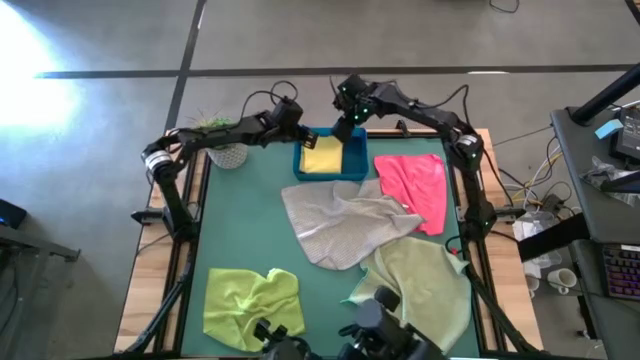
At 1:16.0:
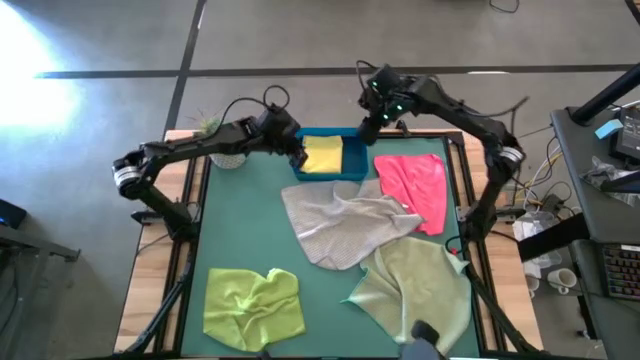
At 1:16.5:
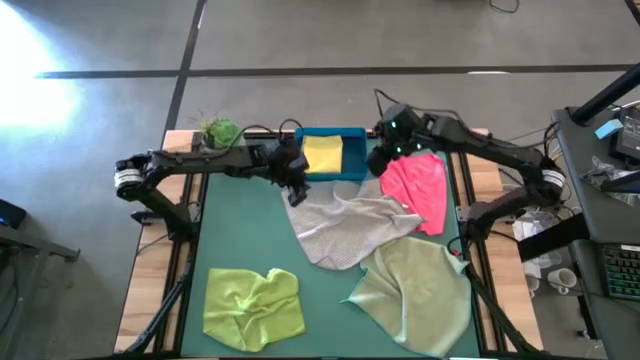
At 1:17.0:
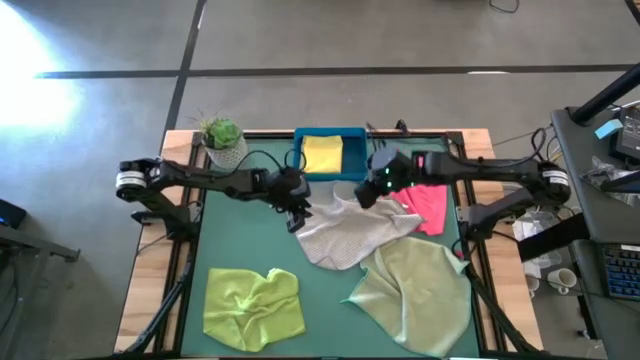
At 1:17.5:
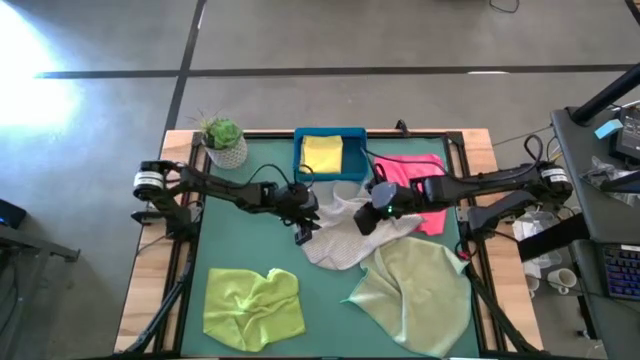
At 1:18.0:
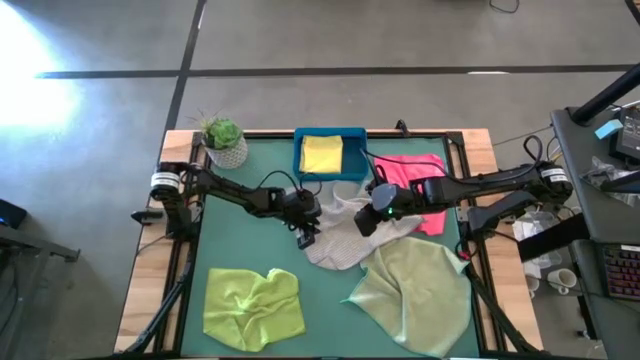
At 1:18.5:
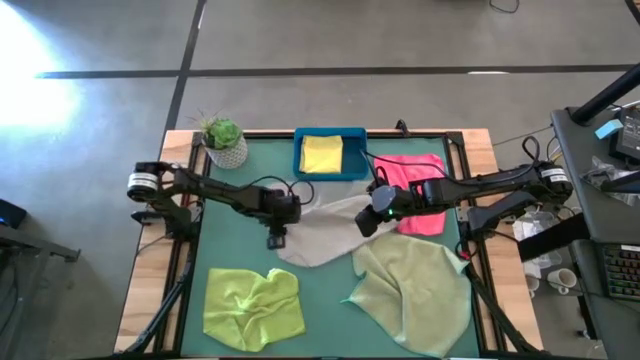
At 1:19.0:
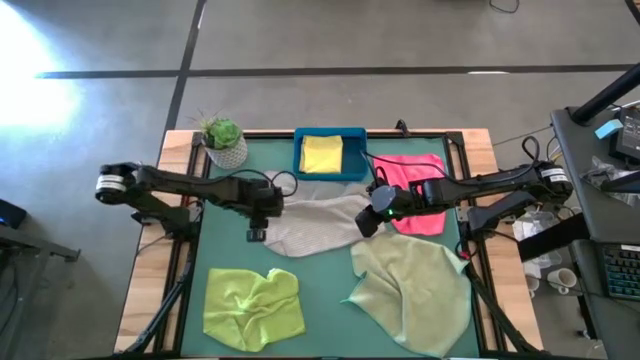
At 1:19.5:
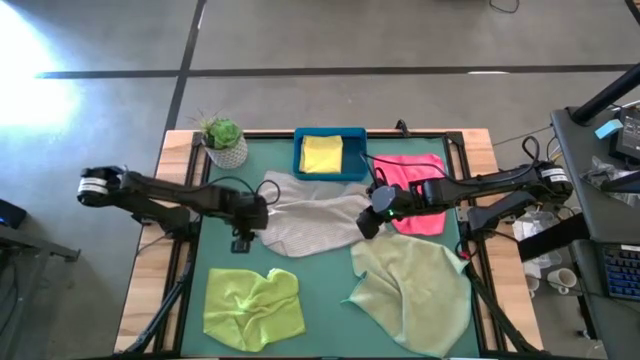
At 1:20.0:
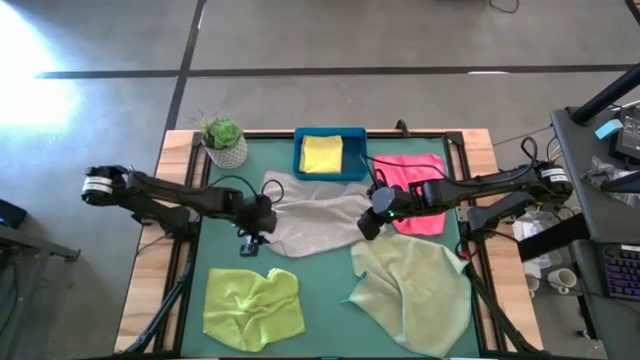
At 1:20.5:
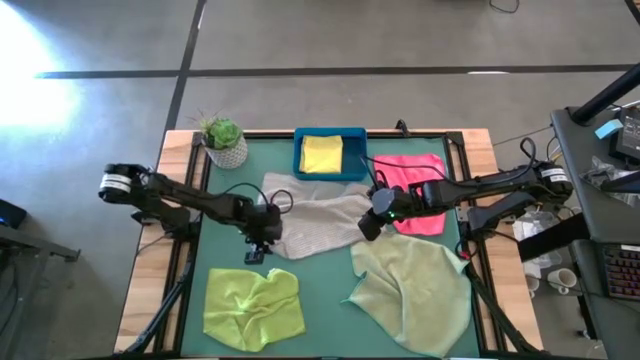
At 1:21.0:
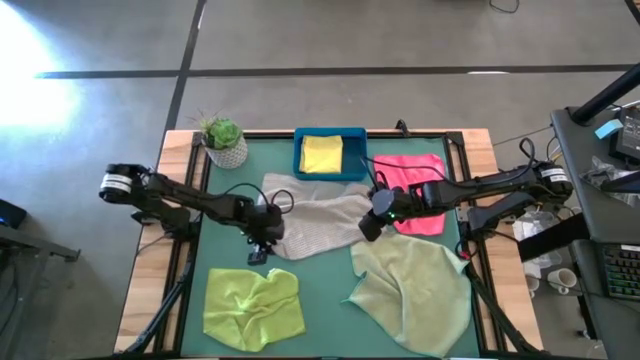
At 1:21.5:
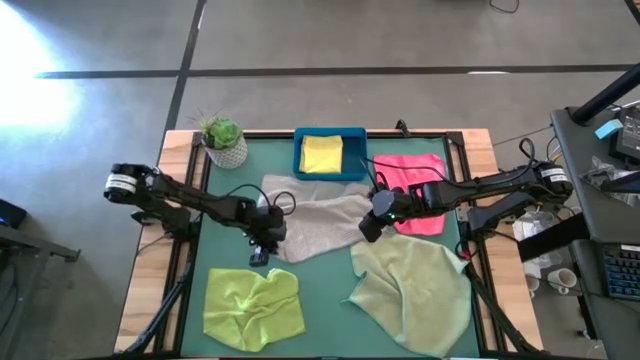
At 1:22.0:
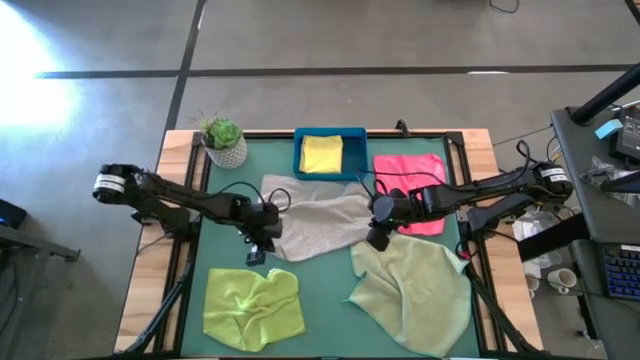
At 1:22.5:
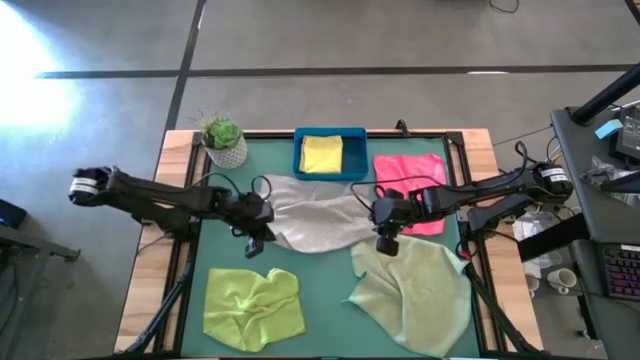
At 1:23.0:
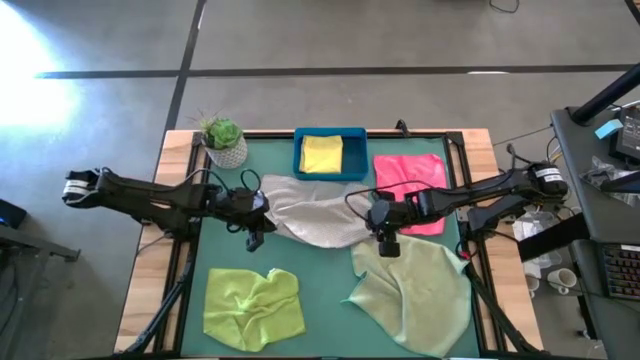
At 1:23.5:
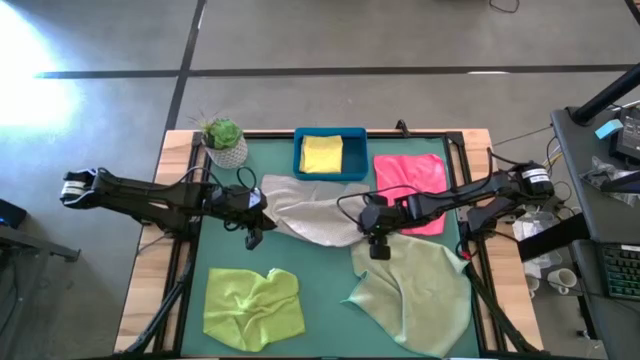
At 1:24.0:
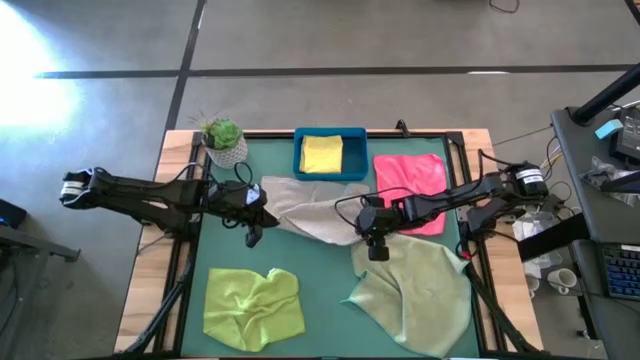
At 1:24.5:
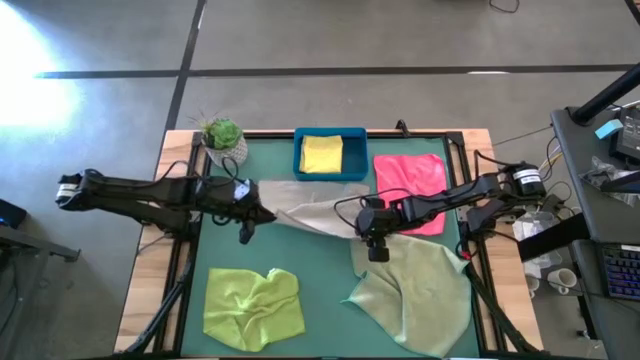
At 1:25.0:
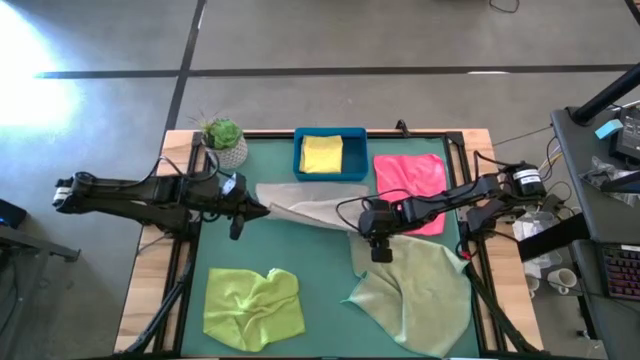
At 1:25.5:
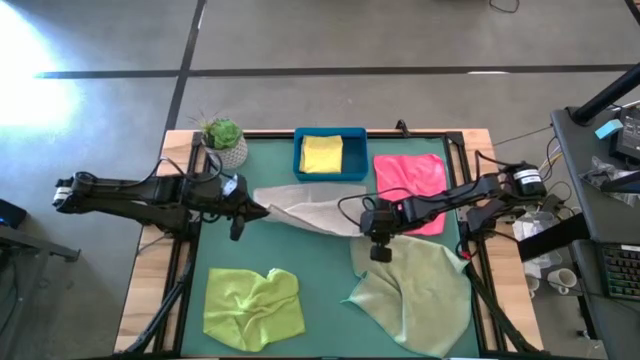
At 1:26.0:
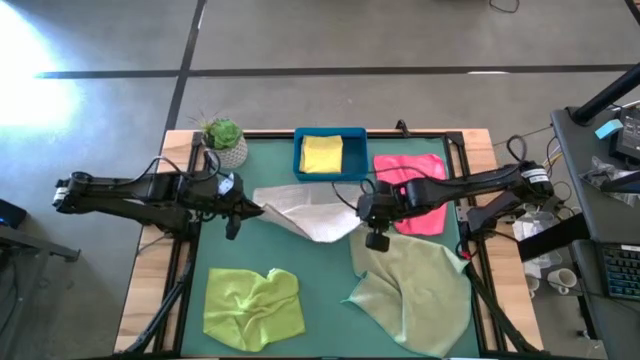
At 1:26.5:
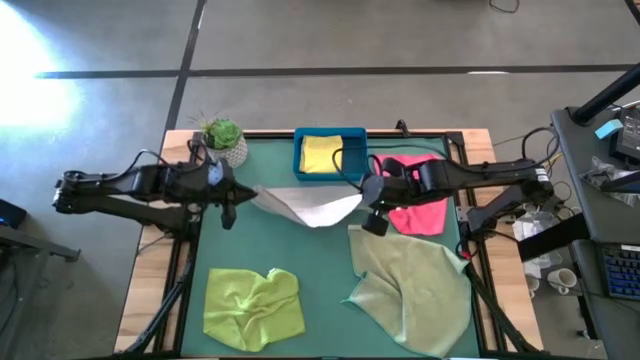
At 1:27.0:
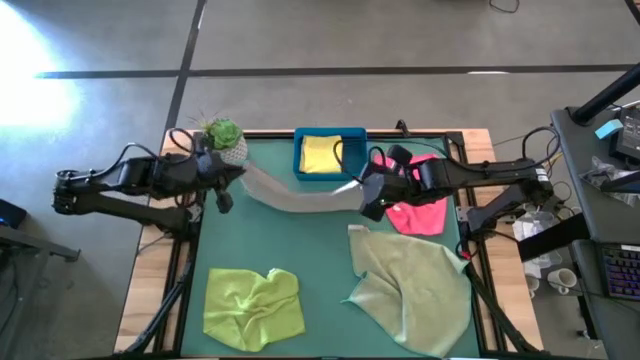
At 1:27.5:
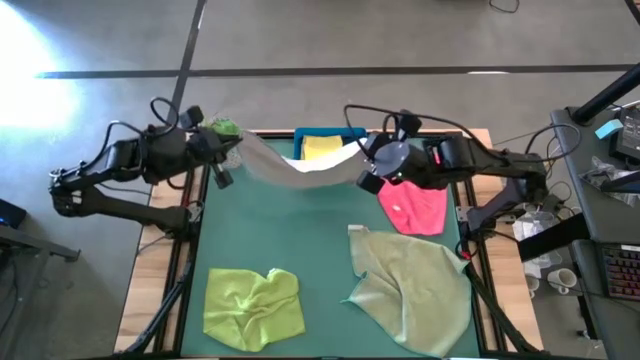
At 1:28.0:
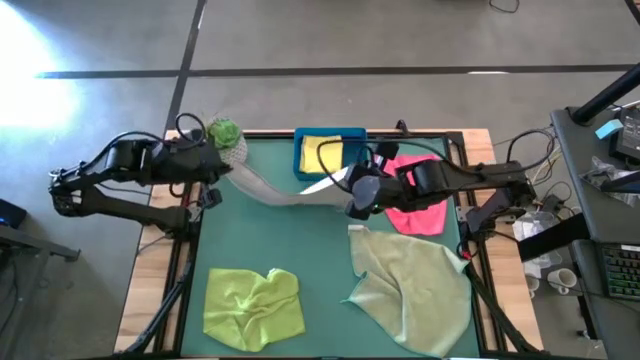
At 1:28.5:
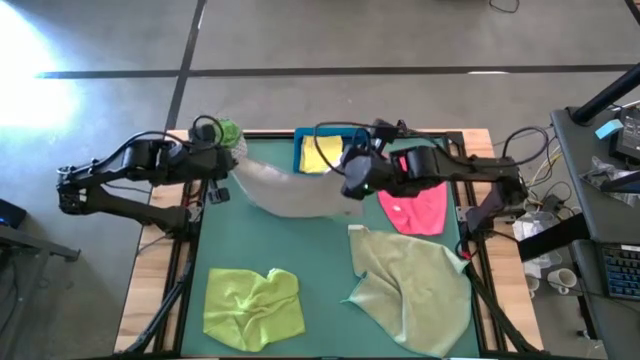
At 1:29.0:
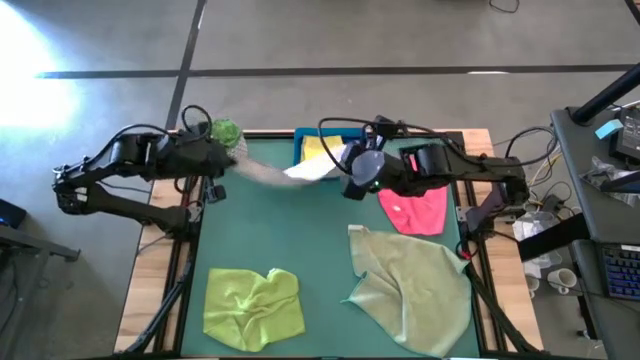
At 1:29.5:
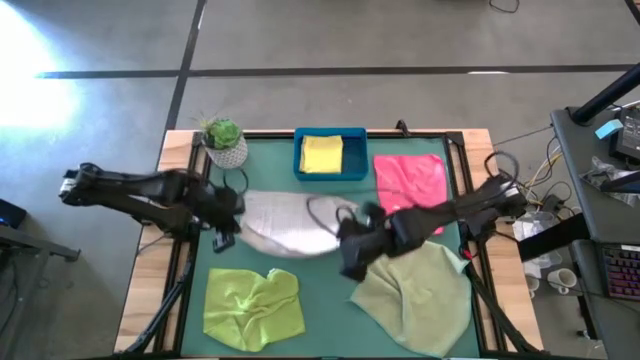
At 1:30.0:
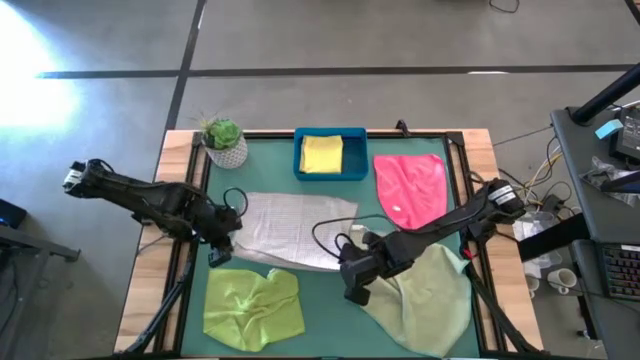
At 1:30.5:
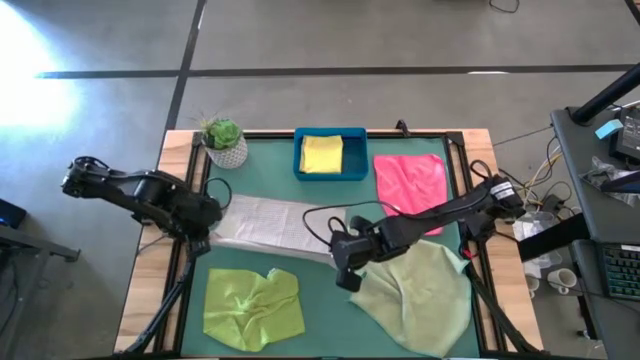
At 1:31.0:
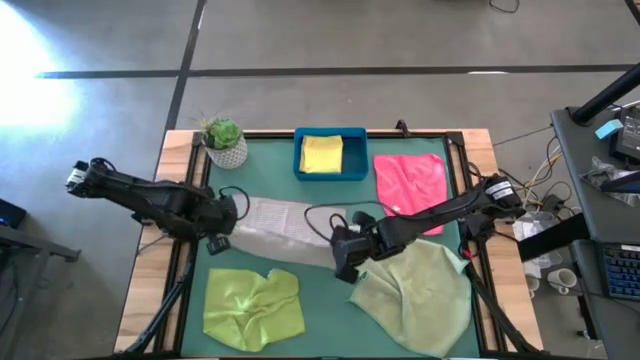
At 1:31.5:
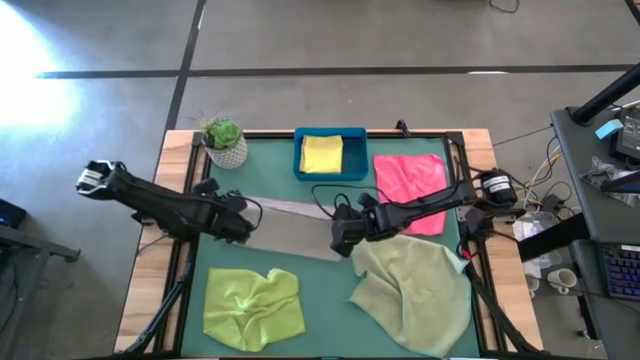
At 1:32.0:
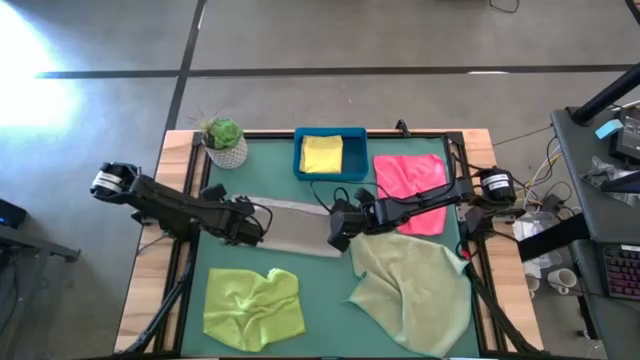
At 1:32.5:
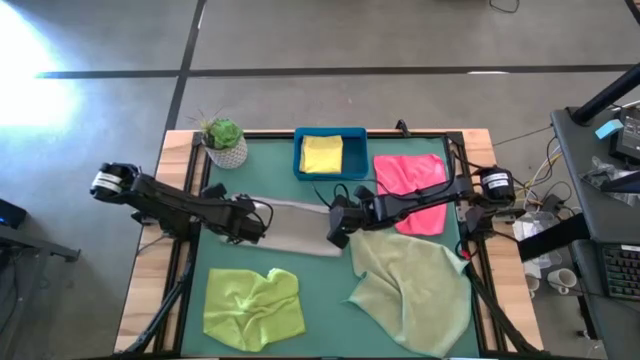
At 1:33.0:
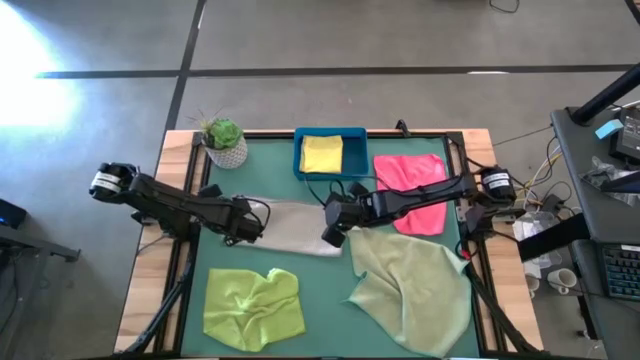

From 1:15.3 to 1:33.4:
Task: Fold microfiber towels
Fold the gray microfiber cloth

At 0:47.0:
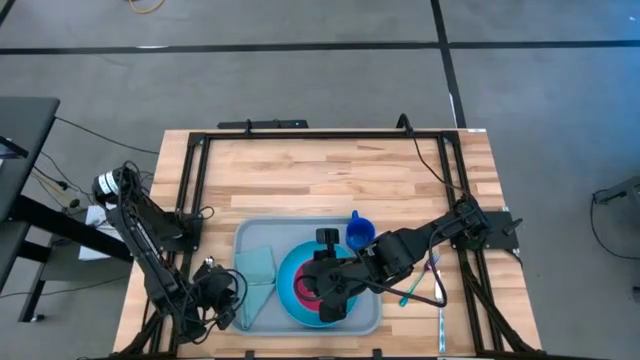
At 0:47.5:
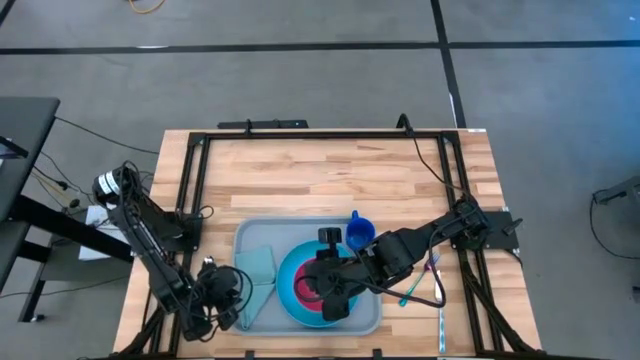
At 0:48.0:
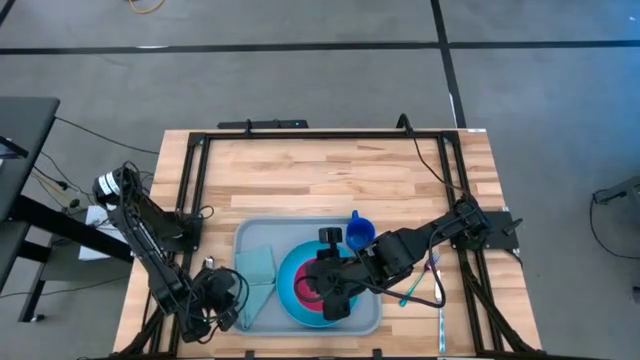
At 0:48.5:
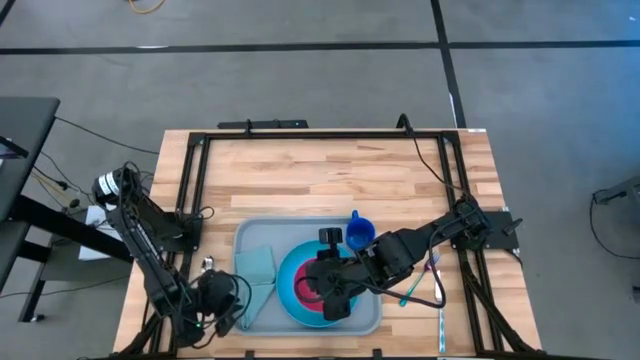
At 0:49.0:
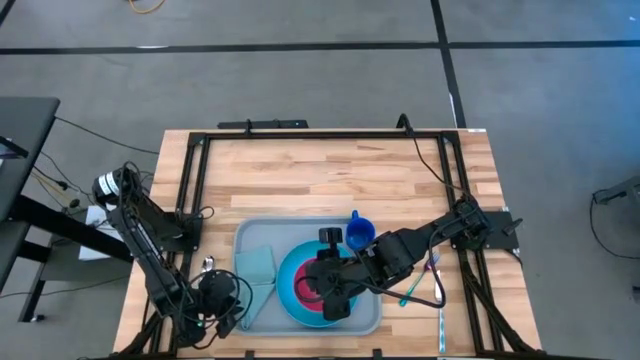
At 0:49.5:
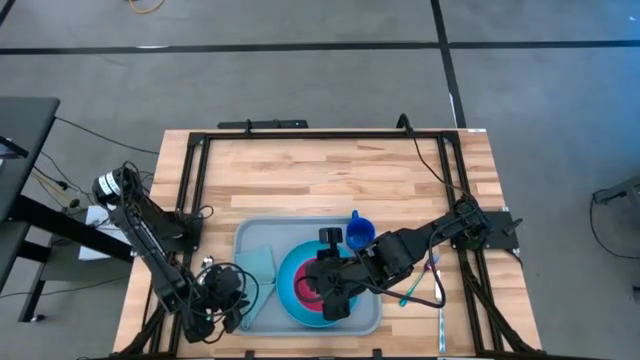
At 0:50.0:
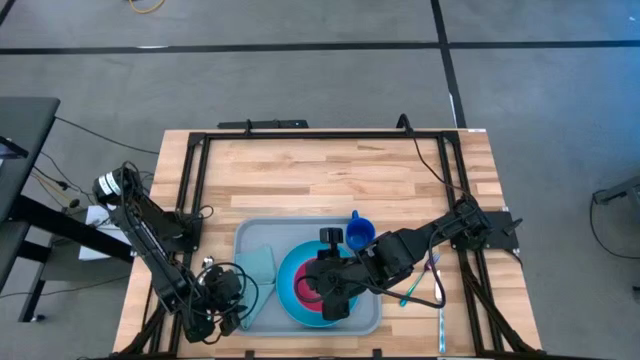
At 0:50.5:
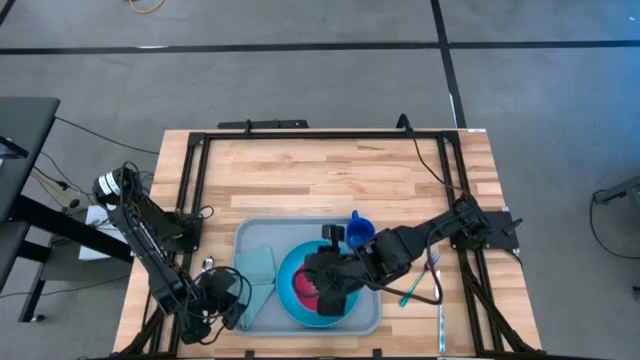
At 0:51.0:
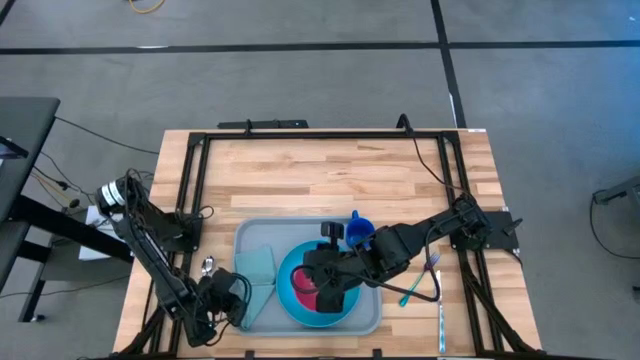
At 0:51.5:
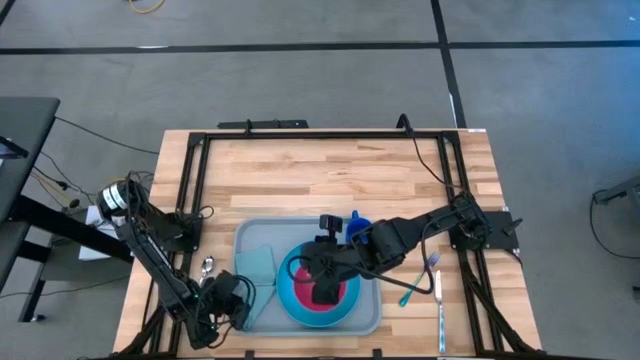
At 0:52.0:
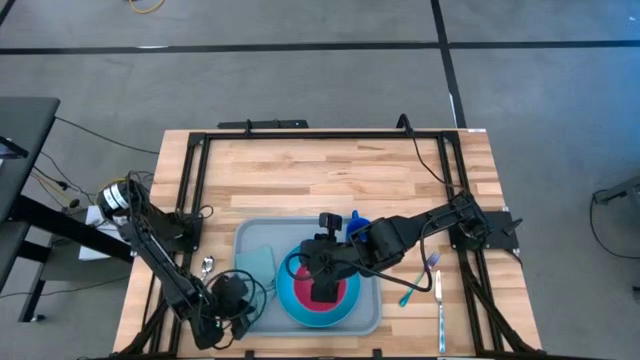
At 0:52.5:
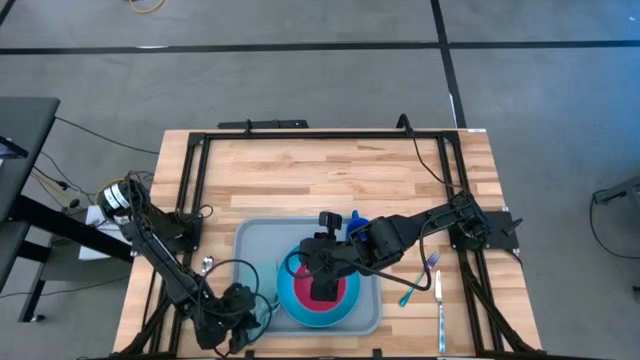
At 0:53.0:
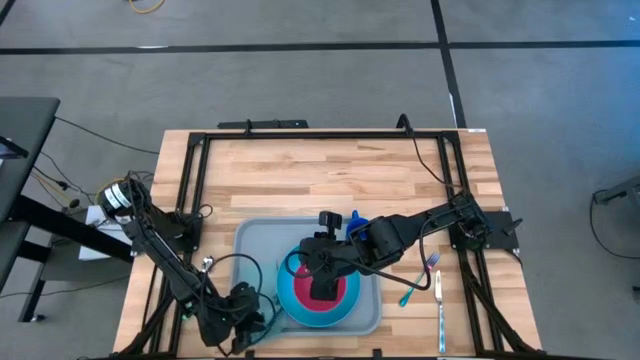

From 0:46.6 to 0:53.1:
Task: Set up tray
Adjust the green napkin on the gray tray
